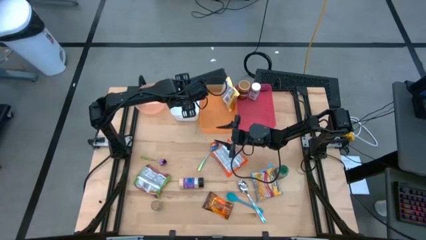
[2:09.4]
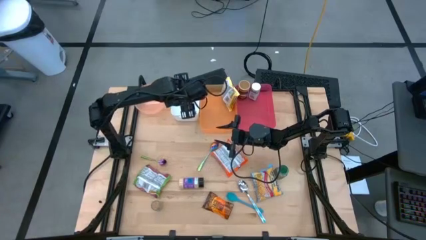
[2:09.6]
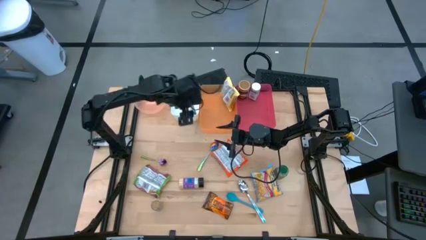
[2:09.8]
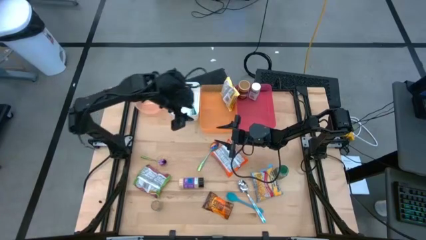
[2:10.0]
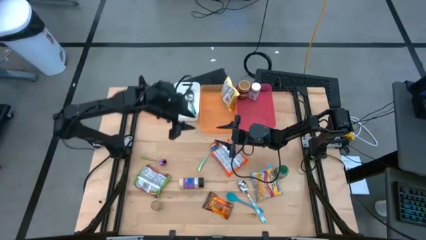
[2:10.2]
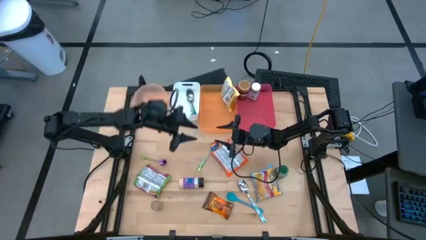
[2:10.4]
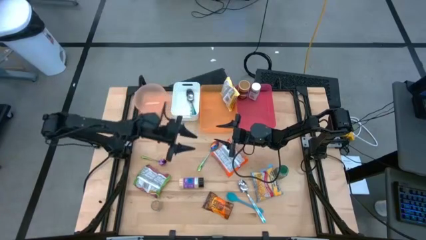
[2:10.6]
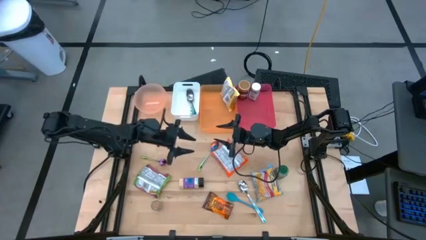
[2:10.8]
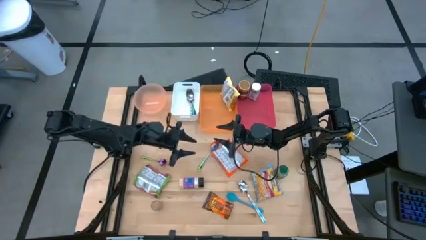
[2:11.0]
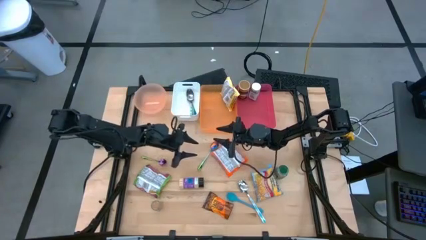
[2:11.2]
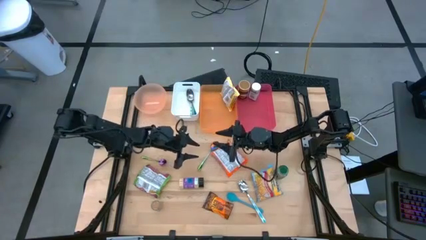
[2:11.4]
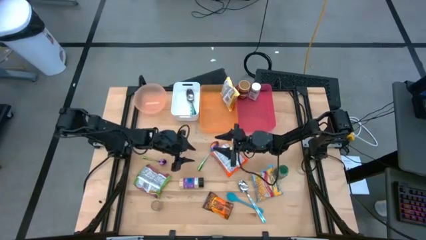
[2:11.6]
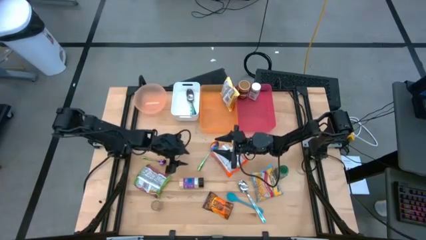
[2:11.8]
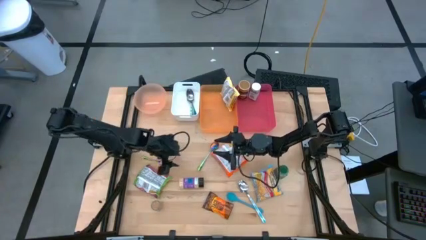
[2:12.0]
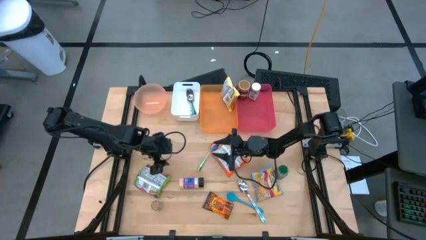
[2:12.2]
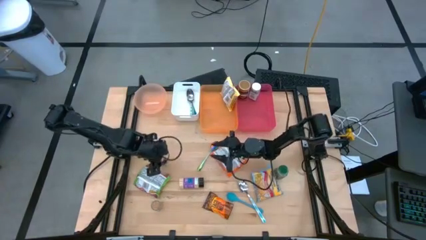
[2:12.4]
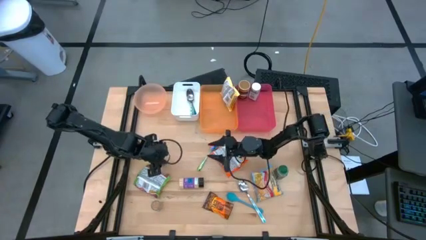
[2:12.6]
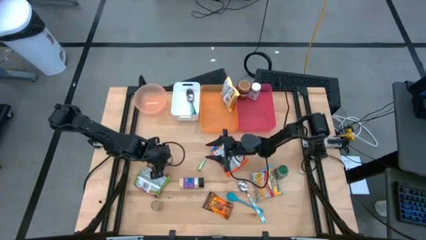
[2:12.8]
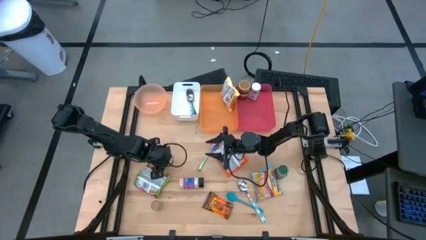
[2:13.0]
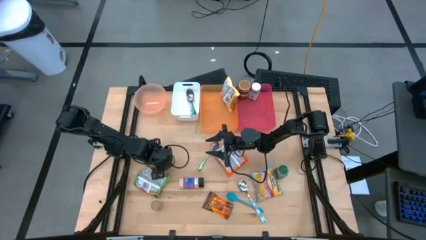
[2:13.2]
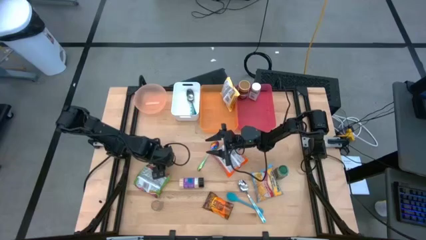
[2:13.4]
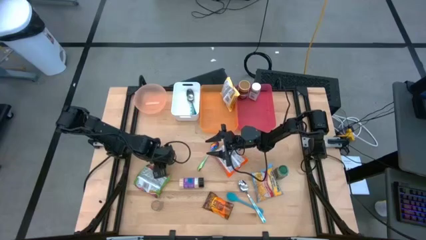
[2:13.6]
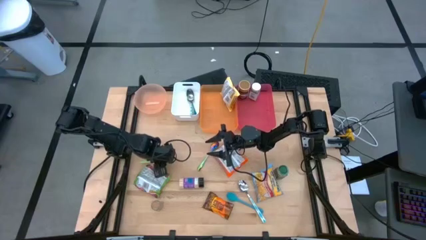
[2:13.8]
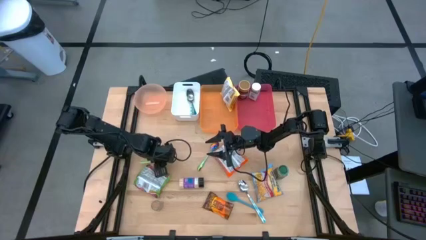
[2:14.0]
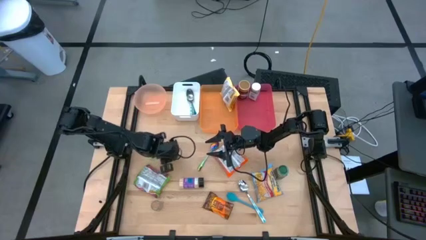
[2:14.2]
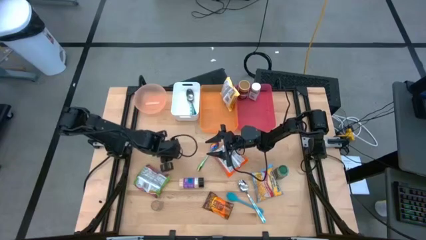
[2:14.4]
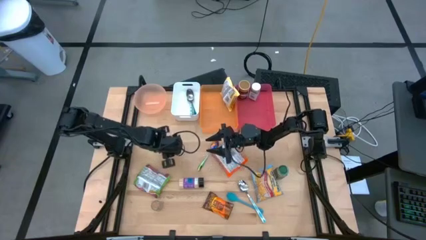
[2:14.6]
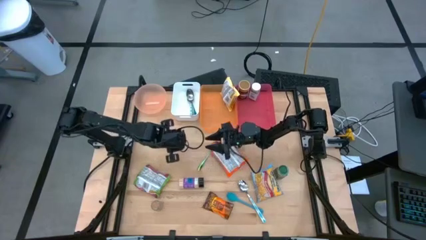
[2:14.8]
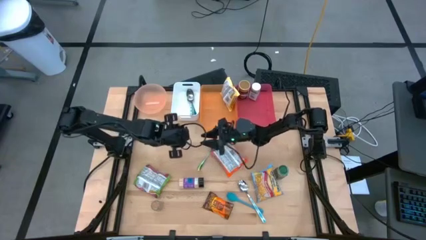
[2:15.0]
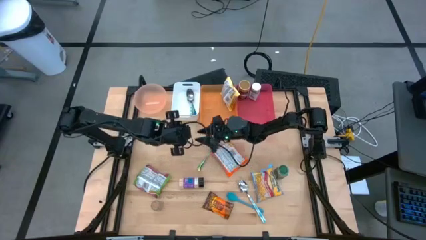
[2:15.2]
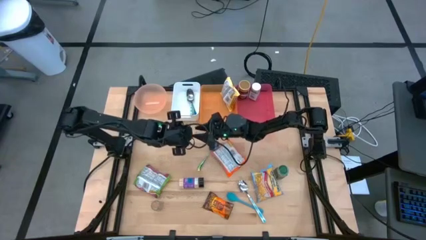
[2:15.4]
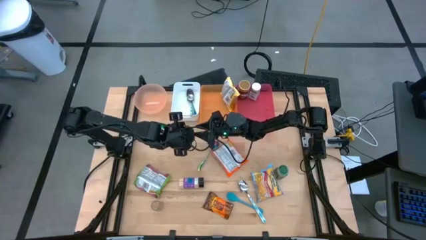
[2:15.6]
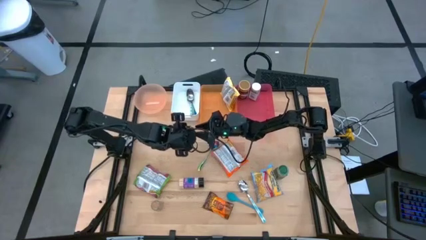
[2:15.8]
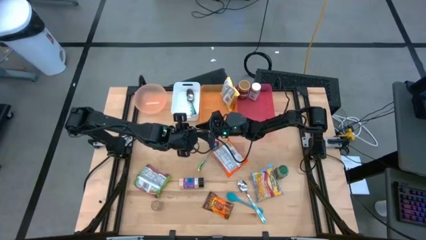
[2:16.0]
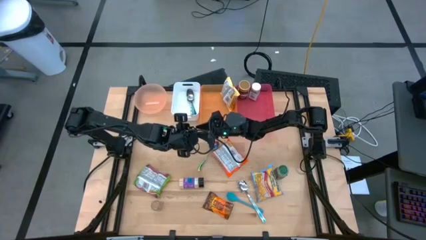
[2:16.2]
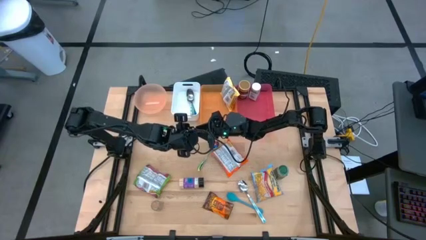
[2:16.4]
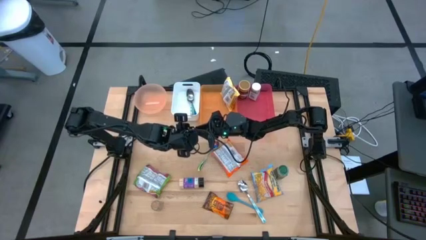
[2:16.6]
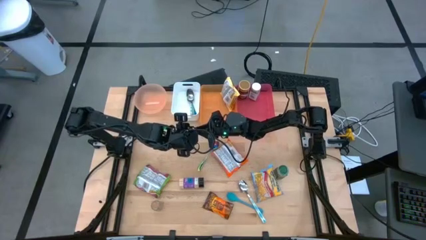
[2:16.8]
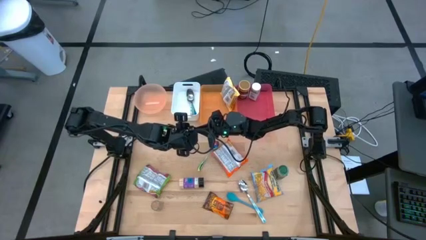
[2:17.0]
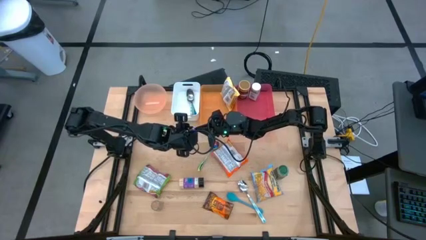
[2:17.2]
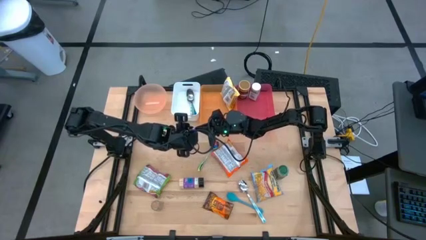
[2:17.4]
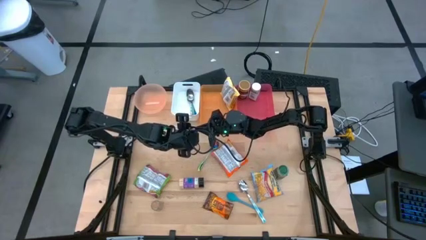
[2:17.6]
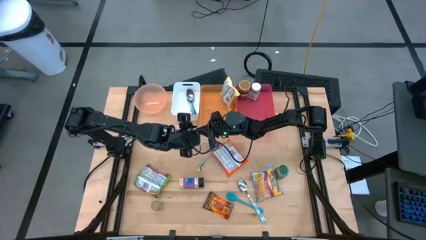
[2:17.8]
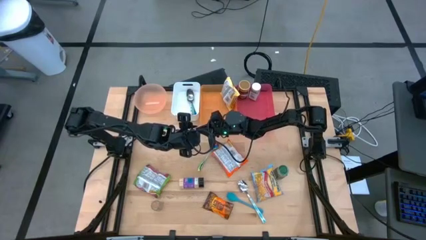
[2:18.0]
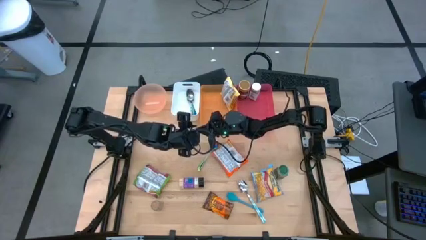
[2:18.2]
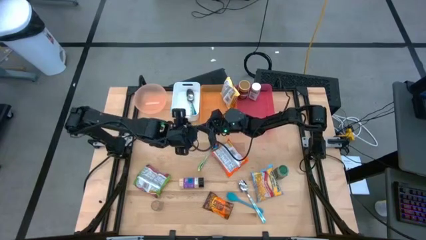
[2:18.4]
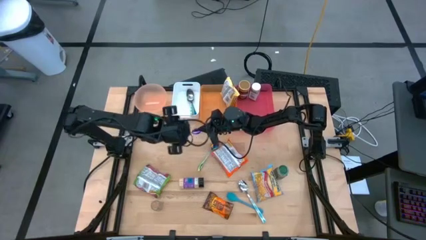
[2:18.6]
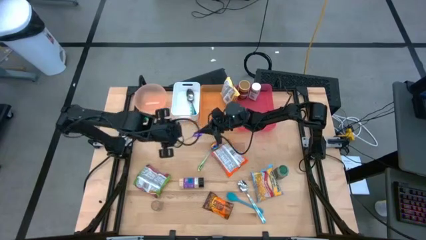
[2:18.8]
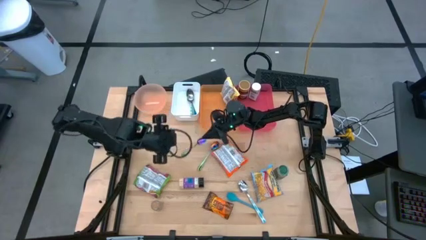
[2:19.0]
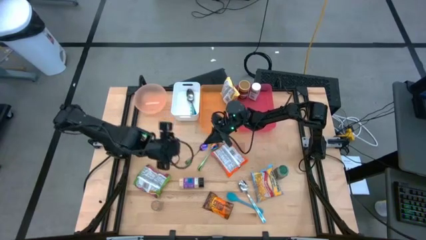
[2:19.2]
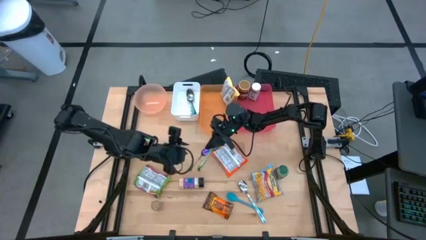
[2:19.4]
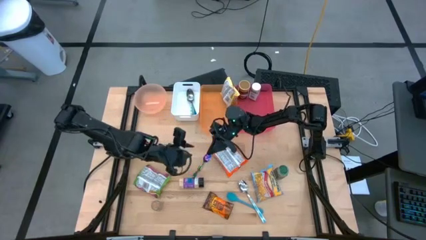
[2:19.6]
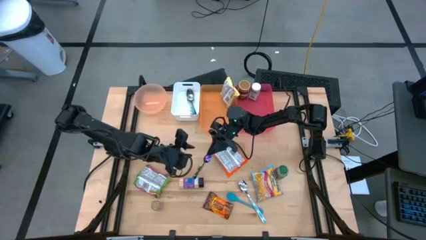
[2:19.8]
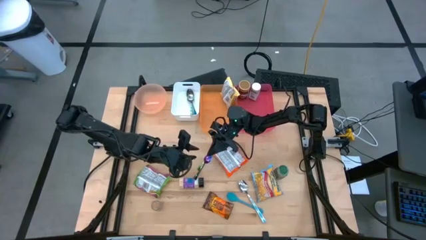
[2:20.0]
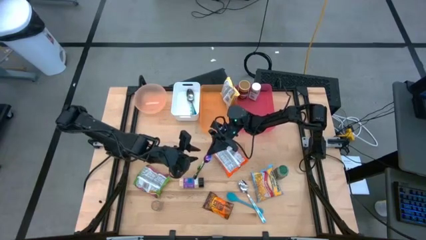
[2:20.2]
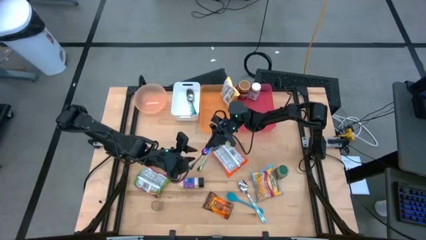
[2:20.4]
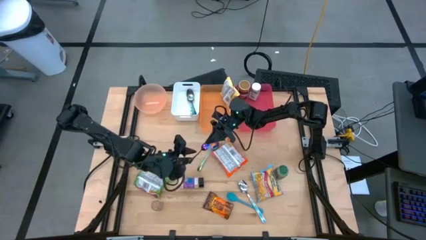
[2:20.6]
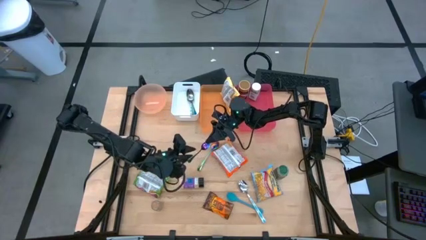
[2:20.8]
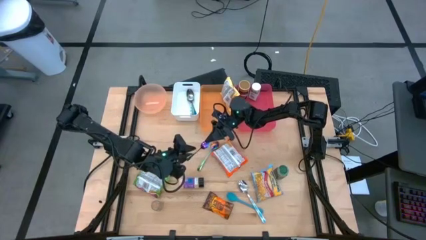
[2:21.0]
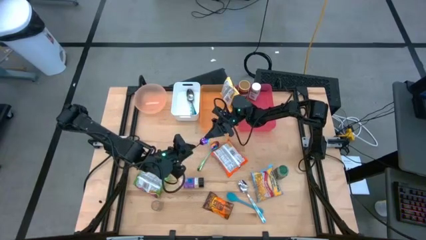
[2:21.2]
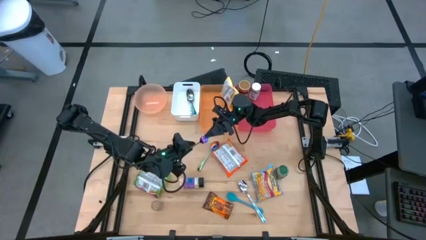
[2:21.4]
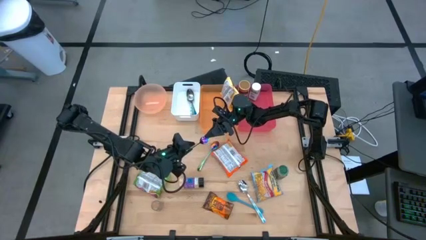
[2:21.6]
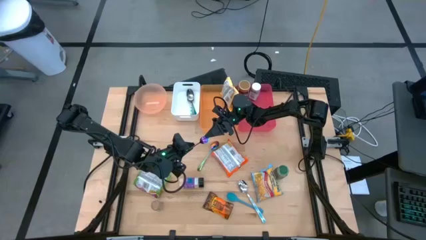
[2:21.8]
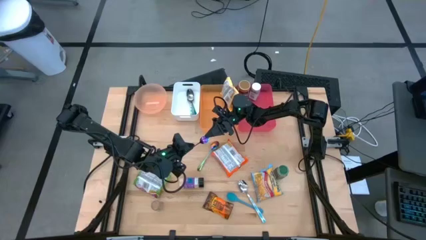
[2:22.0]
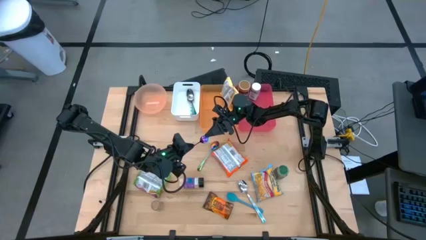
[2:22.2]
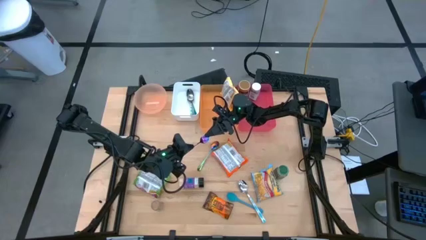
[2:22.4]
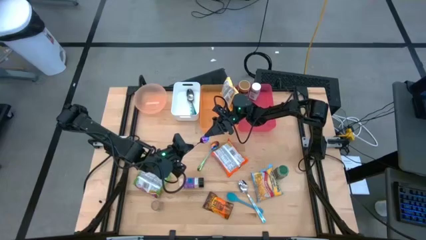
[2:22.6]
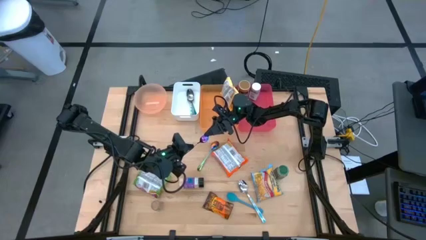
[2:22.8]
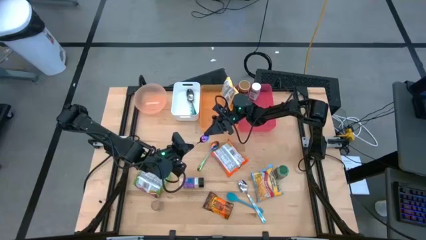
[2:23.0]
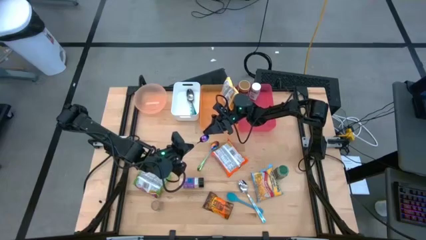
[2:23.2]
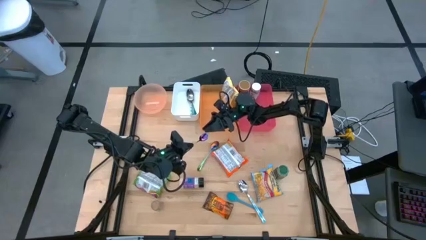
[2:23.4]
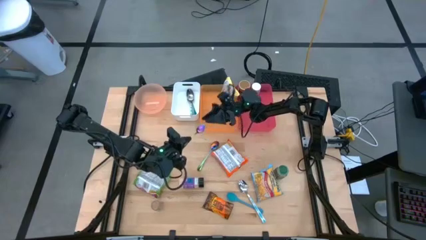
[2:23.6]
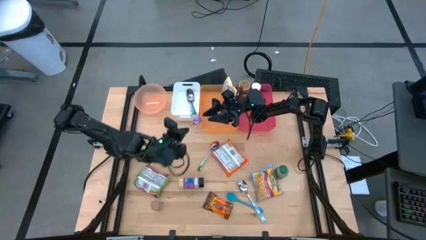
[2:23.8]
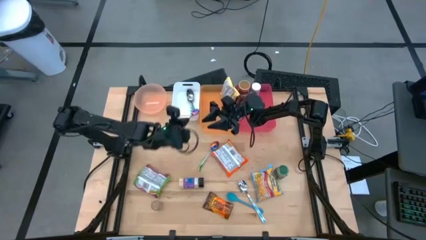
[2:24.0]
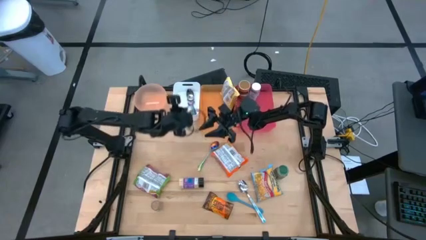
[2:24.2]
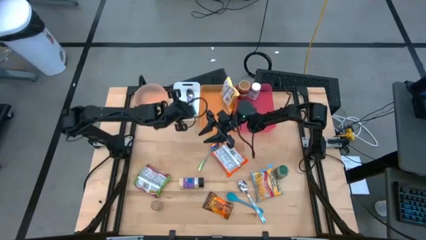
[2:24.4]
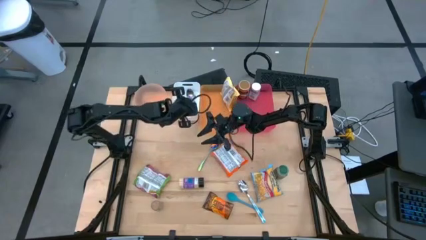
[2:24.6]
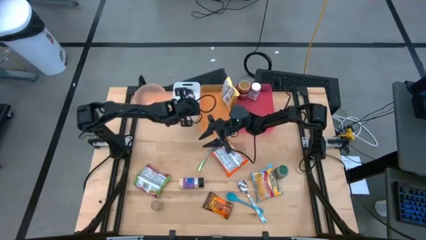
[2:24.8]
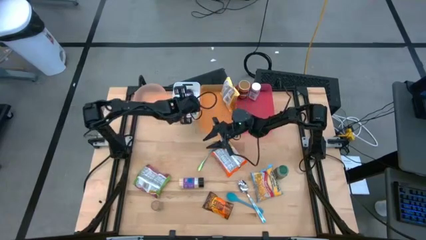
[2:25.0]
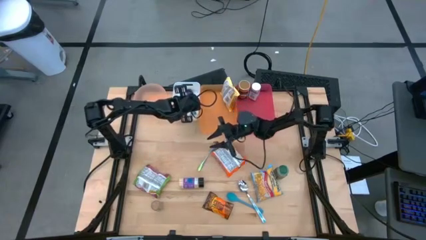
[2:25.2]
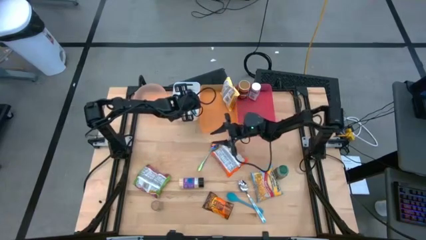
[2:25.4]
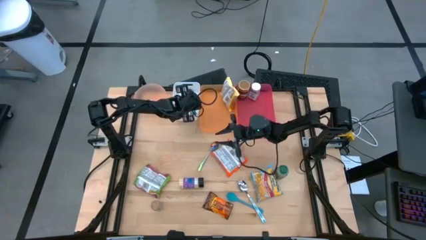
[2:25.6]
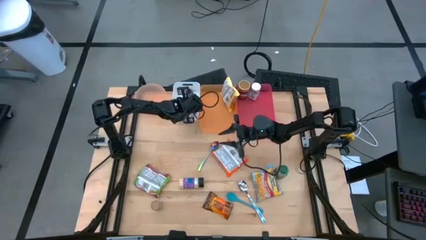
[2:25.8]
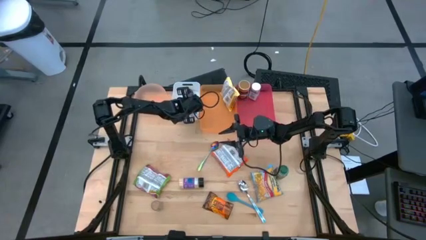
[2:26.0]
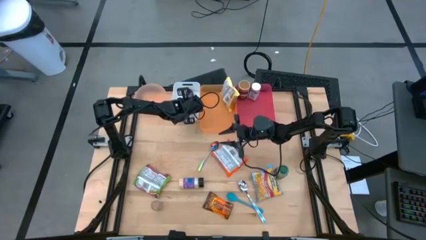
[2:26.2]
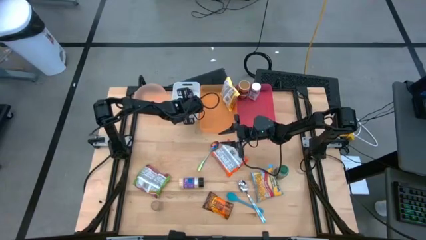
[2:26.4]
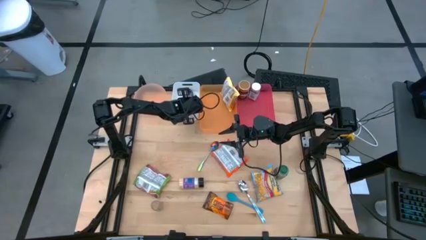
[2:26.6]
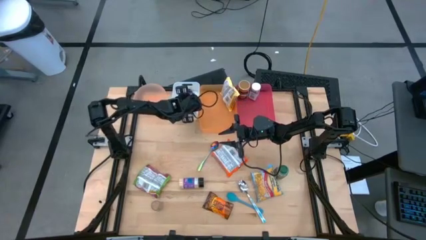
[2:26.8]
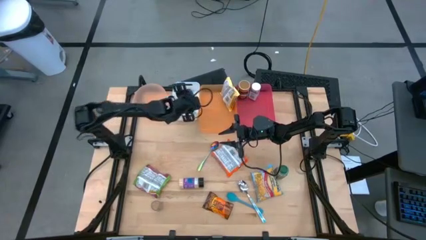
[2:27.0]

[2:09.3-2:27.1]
Task: Pick & Place Food Item
Put the left purple blue spoon into the white bin
